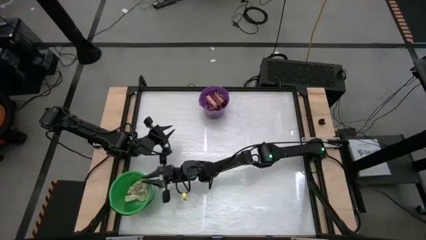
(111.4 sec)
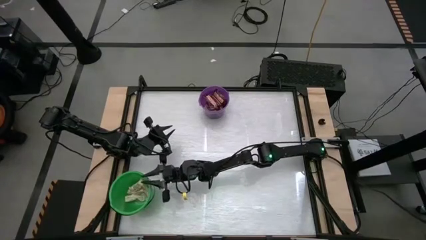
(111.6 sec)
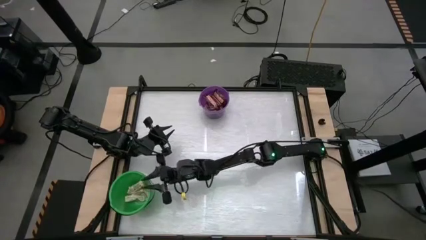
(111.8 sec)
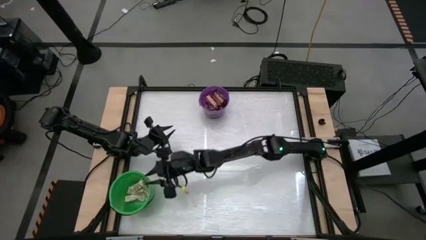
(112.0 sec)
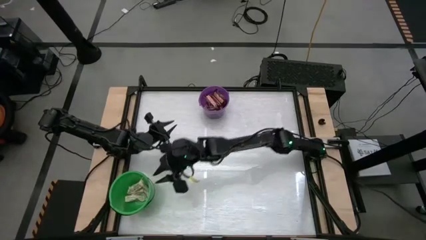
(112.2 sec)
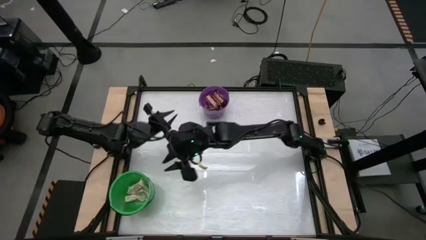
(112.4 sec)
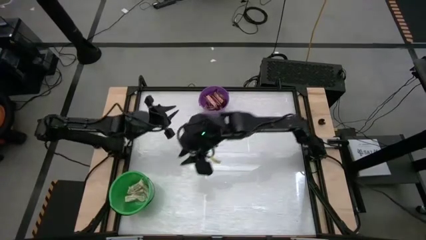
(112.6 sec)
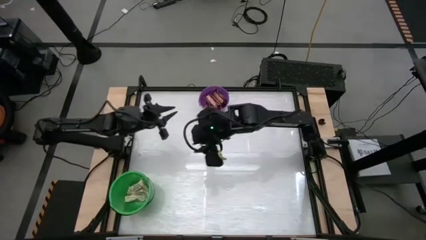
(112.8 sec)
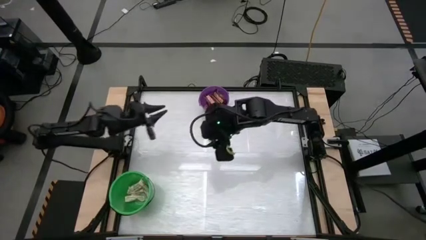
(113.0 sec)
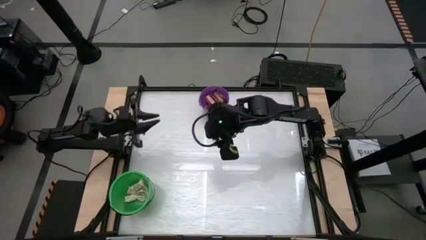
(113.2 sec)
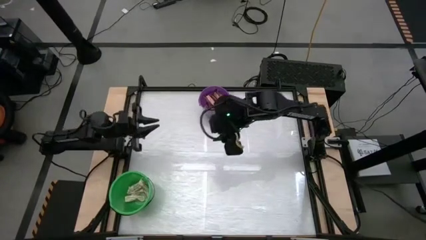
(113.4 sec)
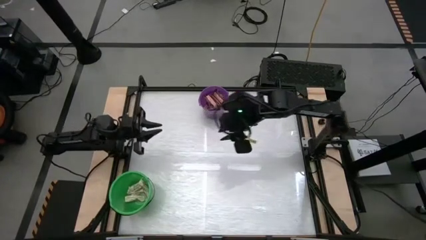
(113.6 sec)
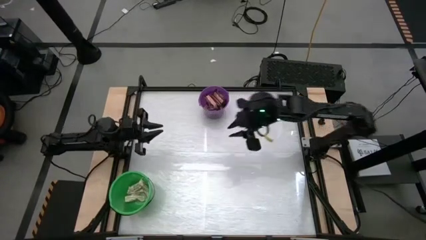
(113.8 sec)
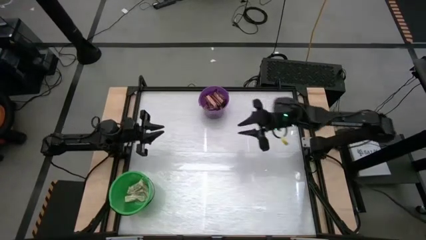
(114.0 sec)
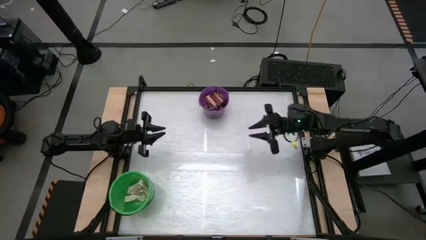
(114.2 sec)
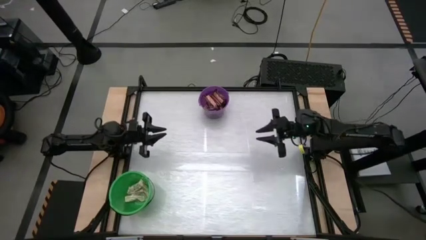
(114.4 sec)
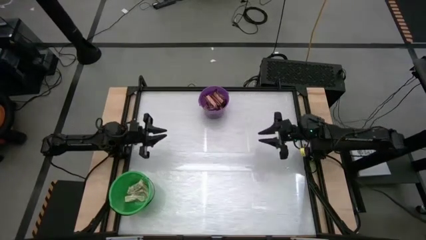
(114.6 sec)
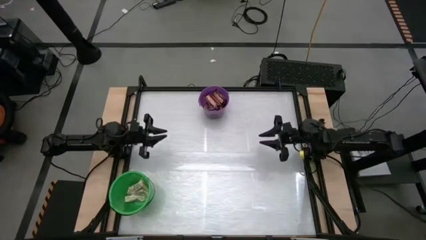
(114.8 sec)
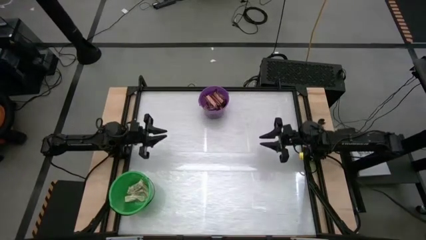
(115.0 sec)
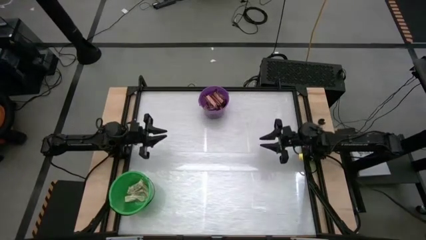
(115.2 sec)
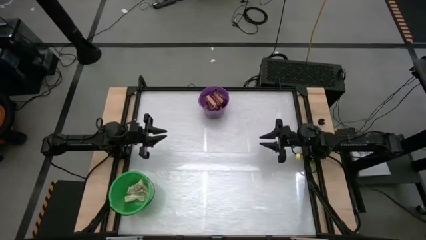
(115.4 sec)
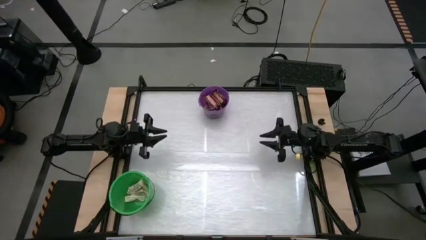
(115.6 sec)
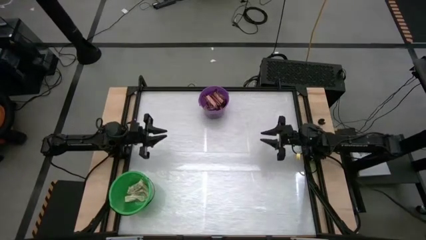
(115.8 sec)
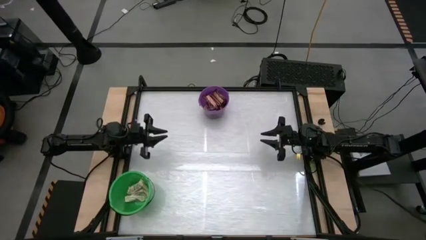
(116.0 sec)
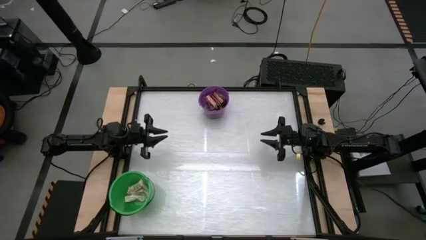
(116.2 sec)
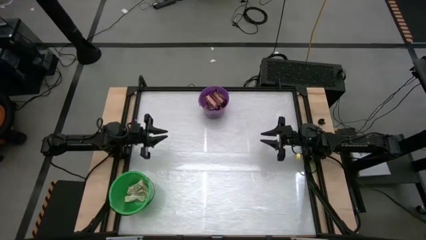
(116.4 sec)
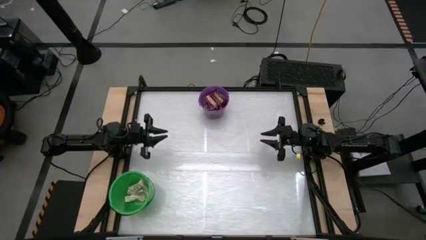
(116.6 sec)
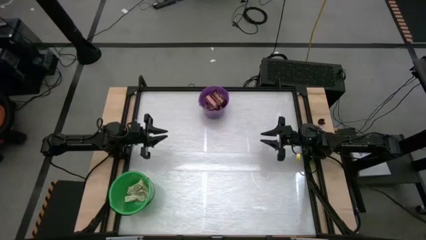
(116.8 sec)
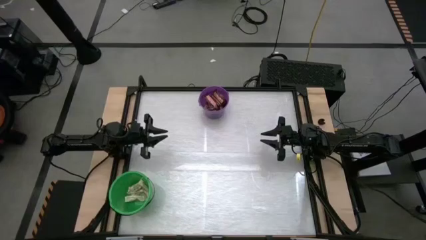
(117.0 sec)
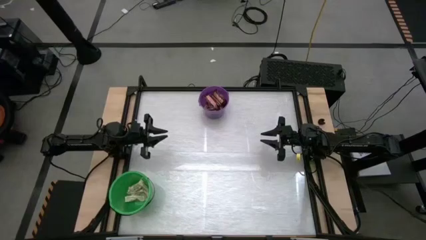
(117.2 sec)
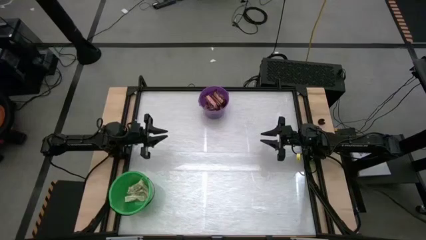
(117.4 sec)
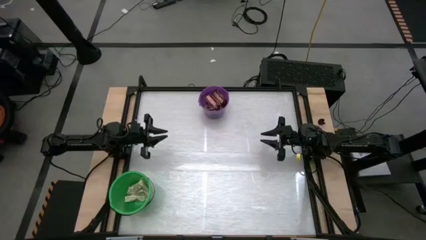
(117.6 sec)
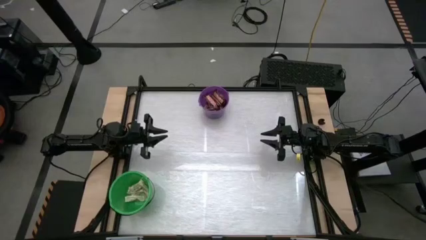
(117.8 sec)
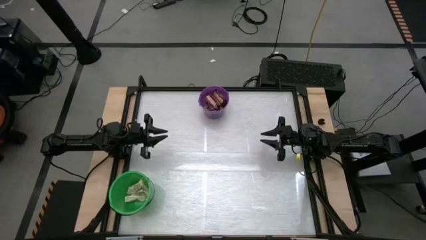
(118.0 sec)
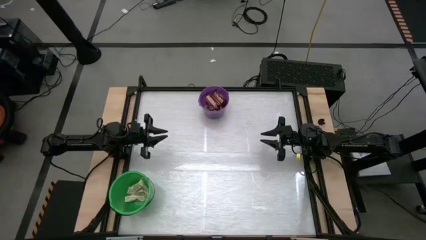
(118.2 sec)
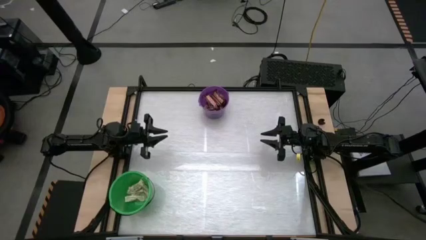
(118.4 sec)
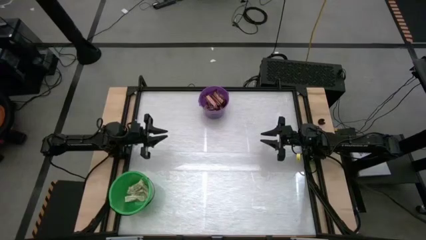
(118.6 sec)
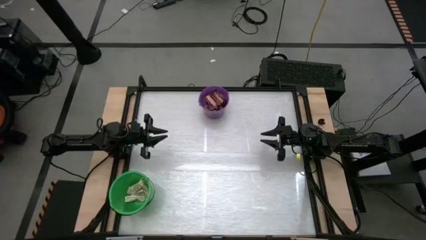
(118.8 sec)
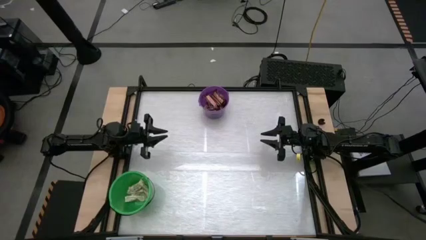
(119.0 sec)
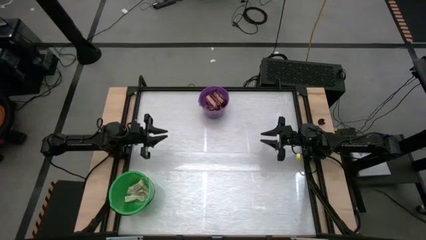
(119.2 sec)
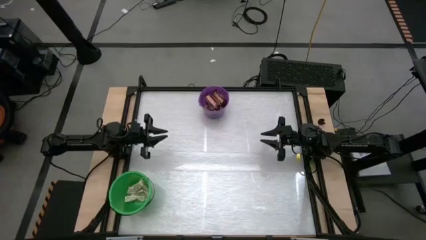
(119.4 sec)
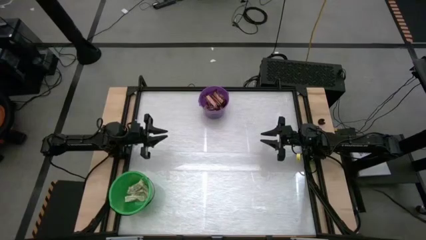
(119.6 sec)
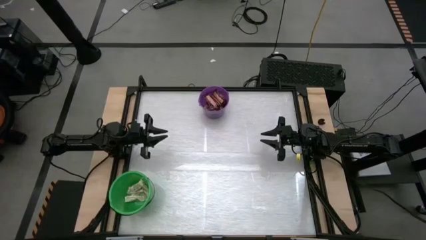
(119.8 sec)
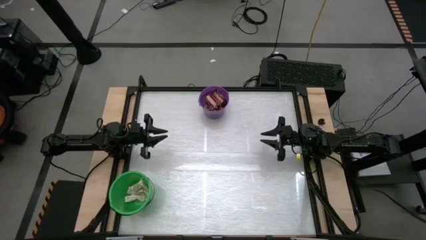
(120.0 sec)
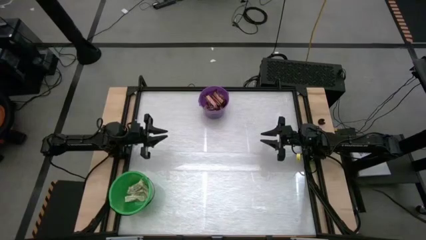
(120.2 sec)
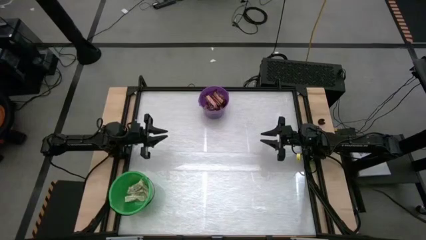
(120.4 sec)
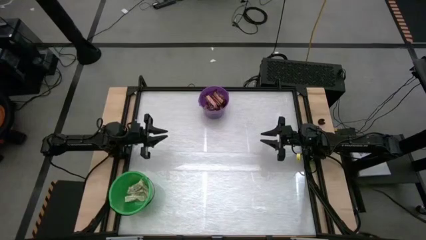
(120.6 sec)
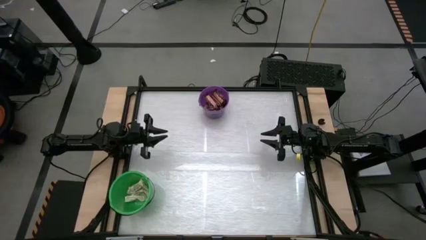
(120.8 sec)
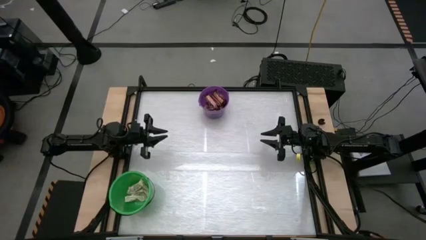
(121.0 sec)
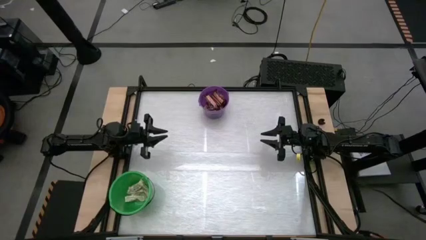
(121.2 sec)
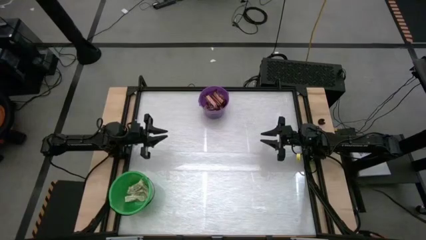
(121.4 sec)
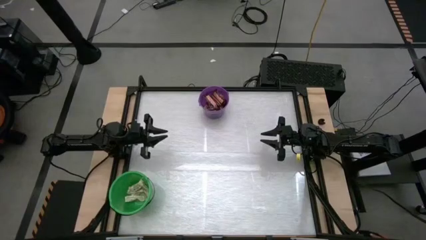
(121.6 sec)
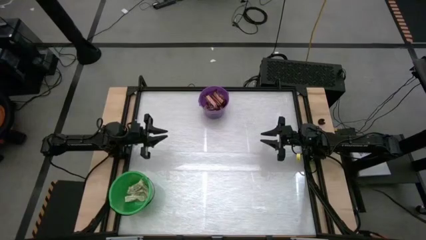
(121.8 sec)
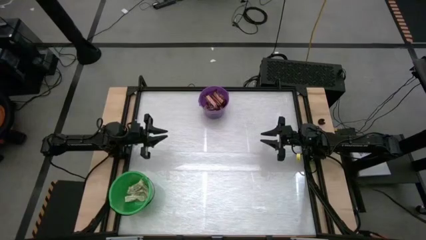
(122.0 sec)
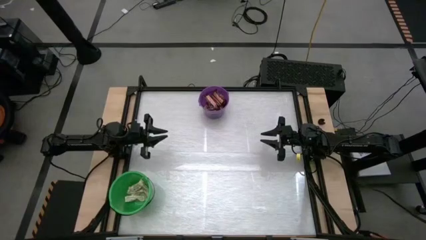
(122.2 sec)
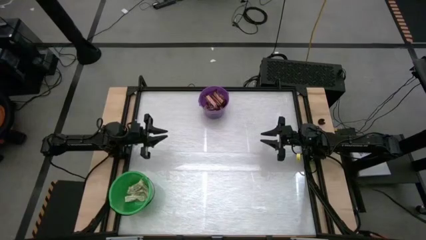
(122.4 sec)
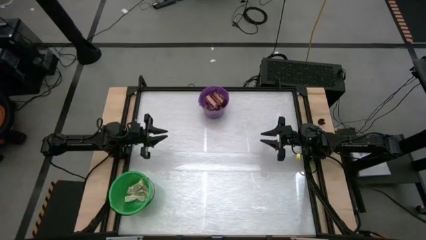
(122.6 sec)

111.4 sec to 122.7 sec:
Task: Sort candy by brand, put in halloween buckets
Return to Home Position

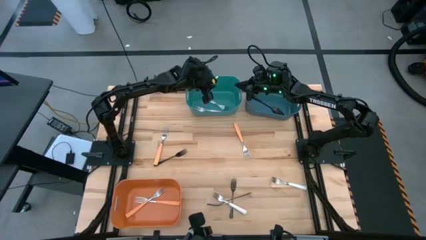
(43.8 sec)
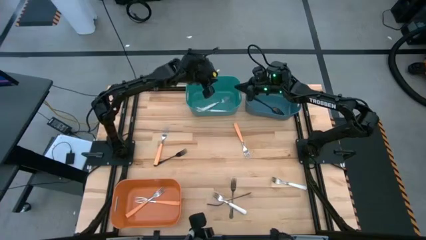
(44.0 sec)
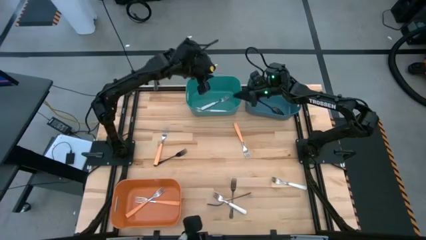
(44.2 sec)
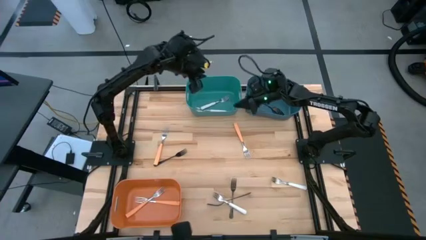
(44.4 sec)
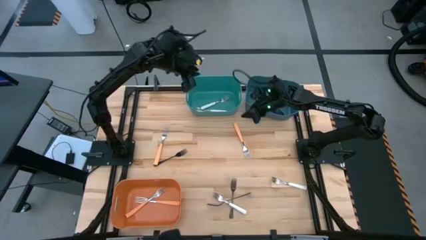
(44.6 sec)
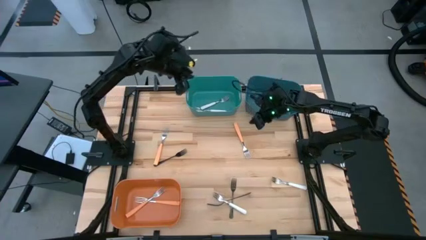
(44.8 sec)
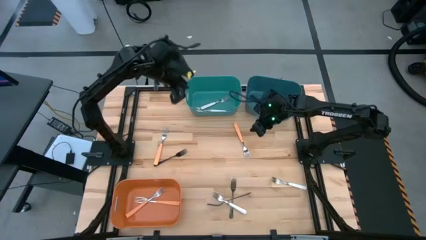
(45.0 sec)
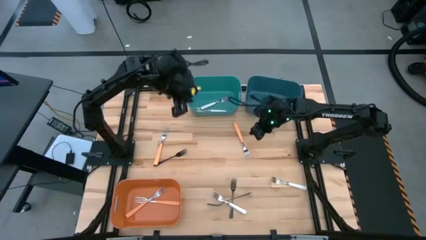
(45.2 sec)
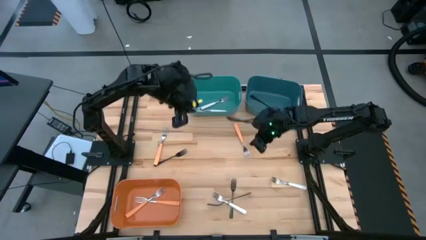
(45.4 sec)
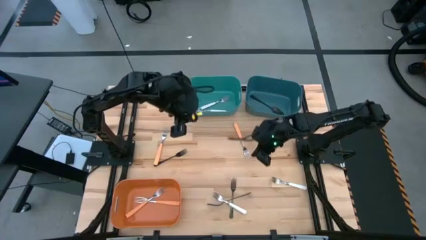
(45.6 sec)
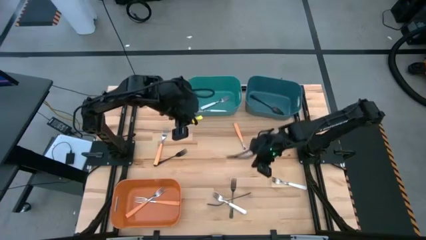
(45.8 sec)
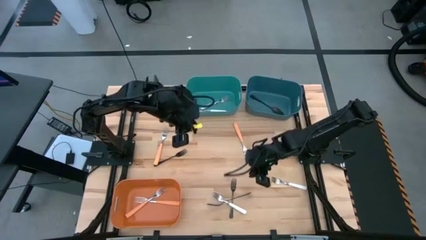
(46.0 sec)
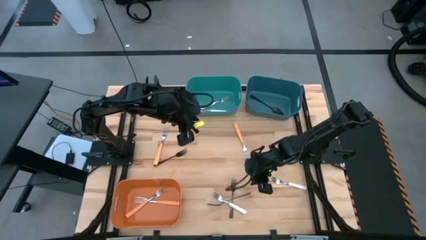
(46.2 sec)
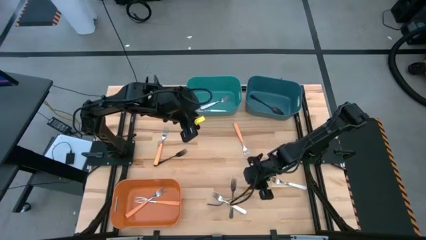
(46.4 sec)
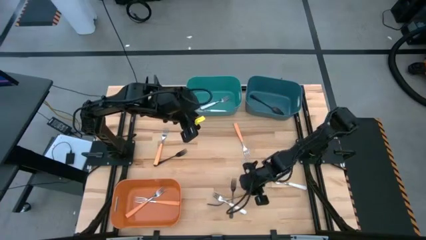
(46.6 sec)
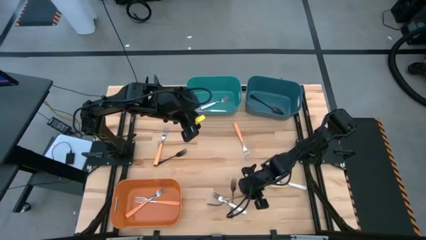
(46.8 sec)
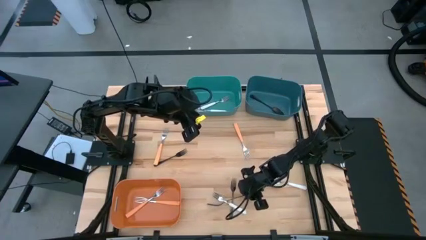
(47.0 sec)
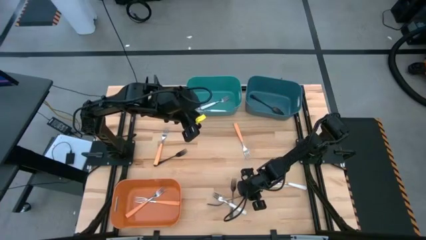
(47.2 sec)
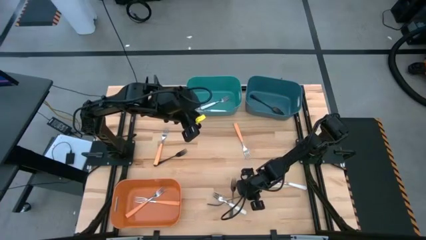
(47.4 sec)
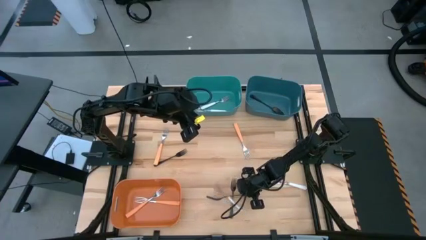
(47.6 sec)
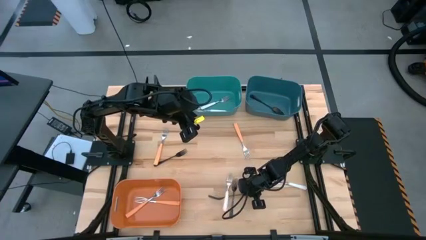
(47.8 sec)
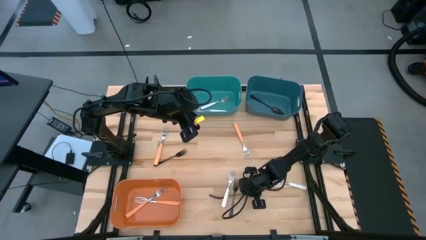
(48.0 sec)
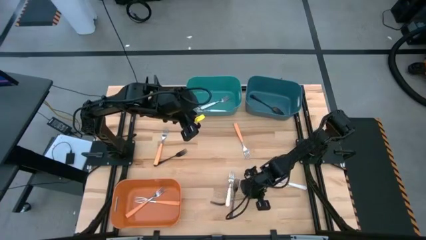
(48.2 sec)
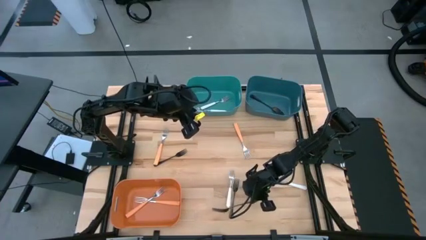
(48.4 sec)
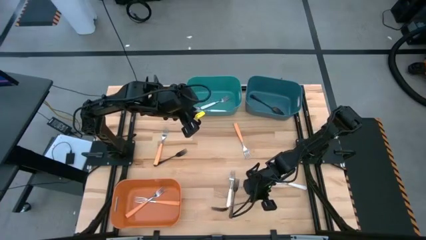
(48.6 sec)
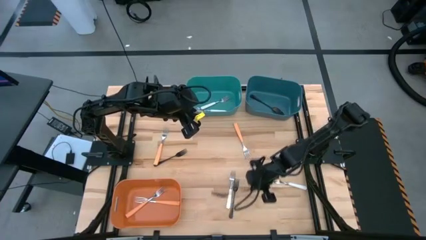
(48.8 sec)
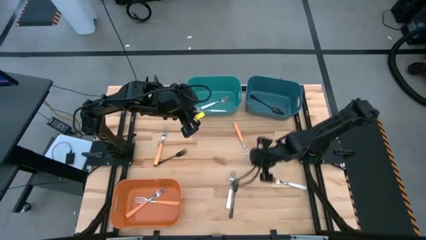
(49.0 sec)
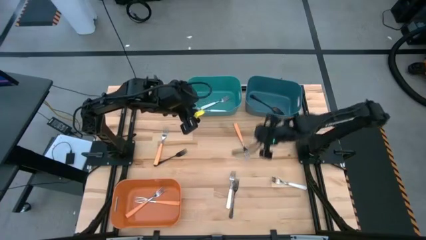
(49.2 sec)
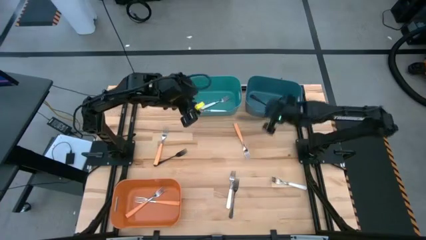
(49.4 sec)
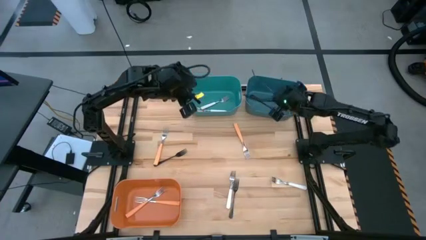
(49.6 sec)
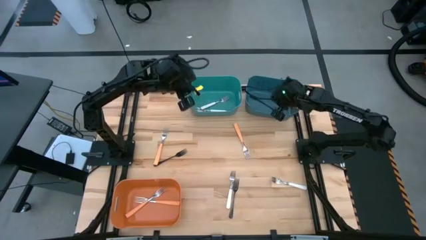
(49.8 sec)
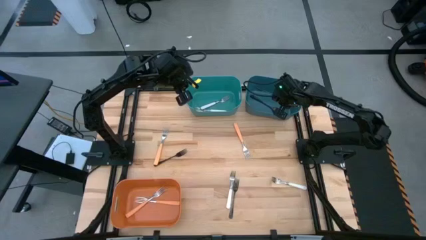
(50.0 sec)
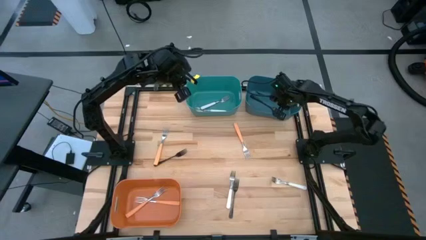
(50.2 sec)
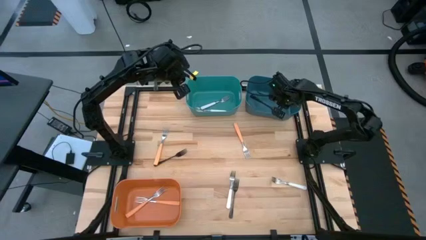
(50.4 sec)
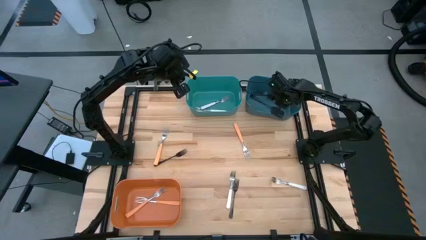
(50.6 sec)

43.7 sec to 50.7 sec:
Task: Sort silverware by color (type)
Put the bottom black fork into the blue bin
